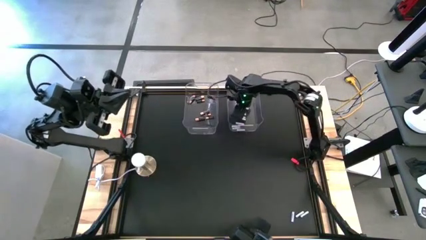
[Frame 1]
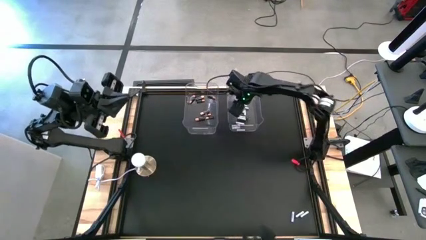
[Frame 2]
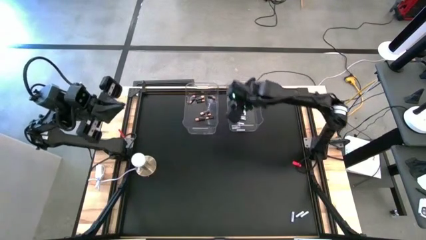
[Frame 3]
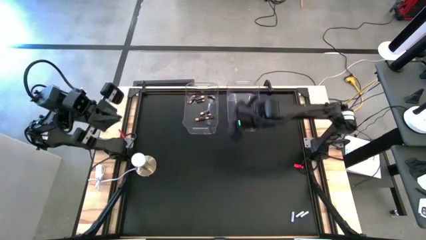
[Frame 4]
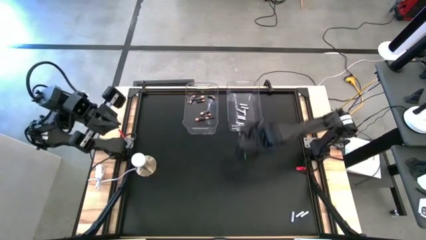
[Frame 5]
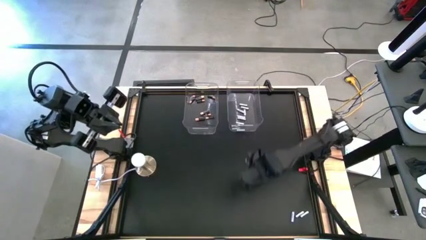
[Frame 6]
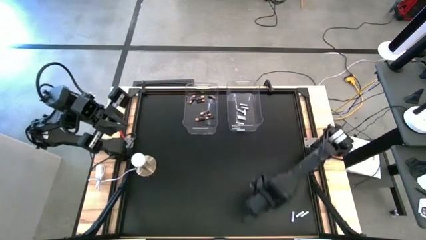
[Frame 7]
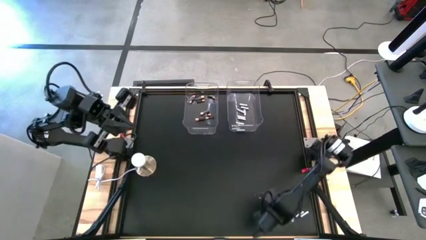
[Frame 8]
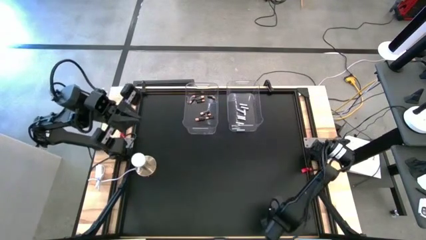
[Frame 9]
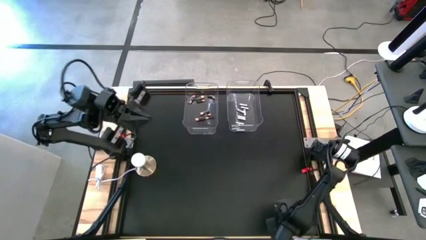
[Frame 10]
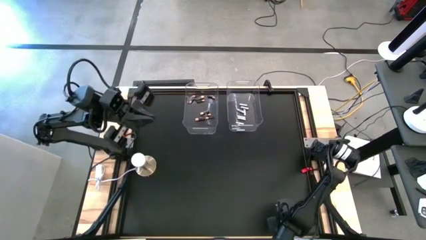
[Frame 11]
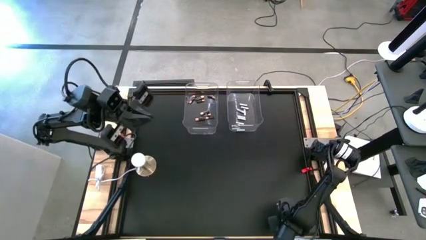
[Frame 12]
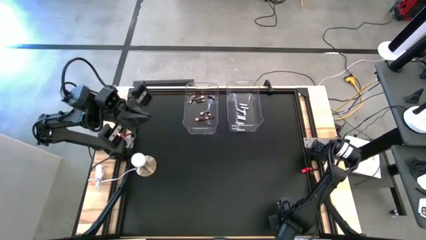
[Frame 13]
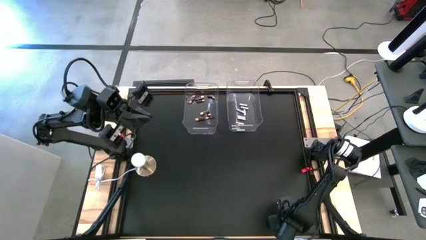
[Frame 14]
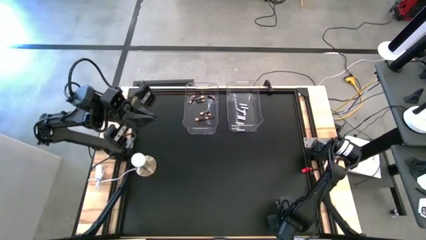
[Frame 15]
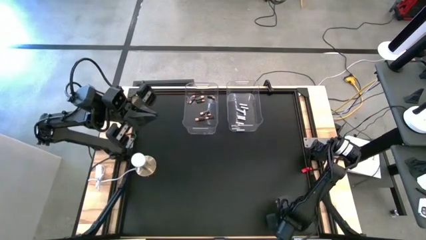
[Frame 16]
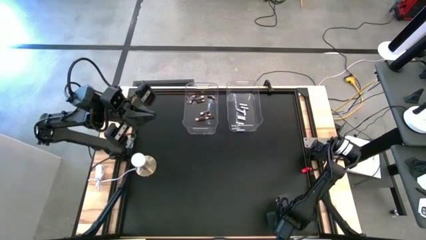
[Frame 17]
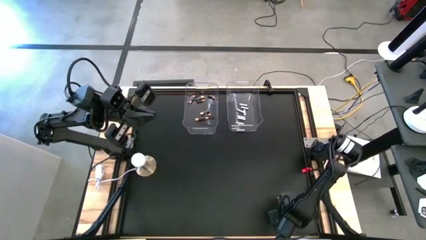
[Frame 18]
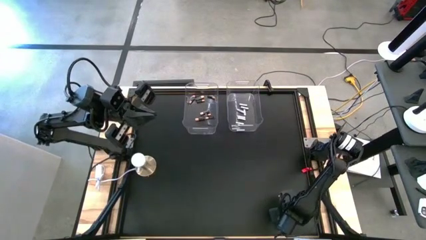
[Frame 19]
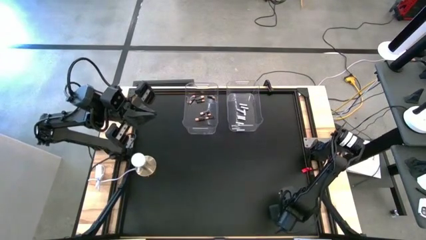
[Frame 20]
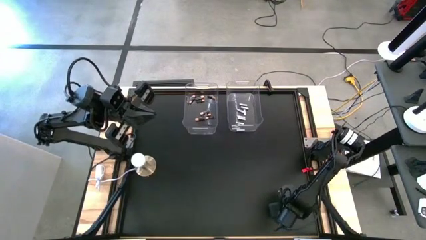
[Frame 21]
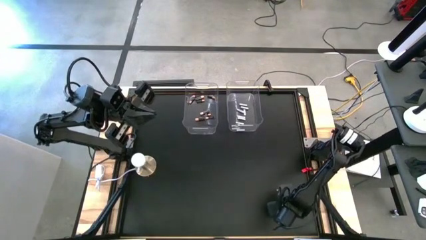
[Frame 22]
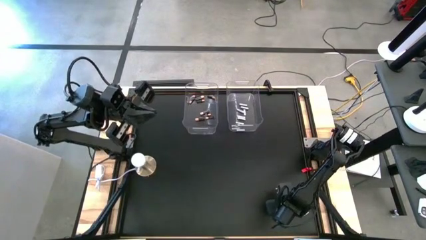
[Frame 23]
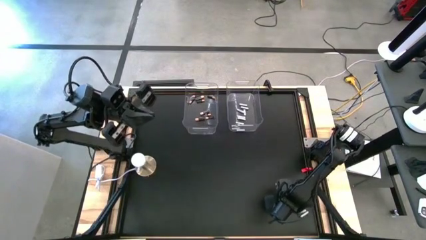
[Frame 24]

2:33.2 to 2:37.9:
Task: Sort batteries
Put the white battery into the right transparent bin

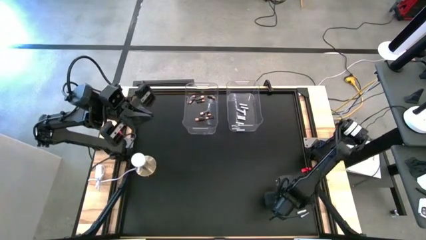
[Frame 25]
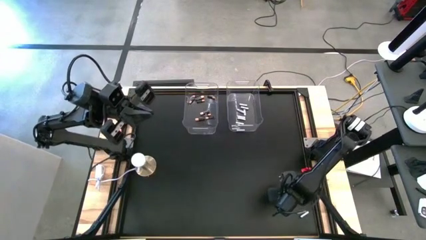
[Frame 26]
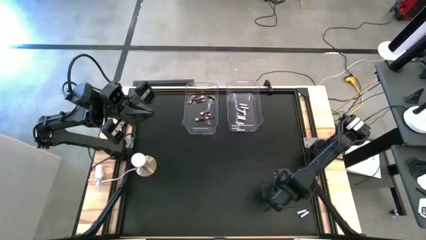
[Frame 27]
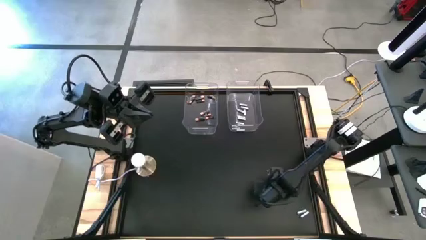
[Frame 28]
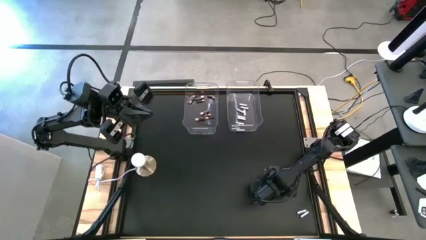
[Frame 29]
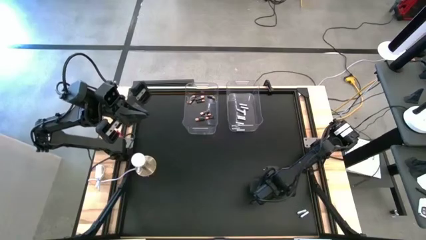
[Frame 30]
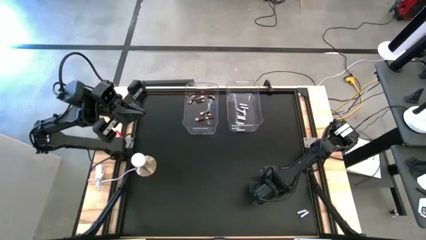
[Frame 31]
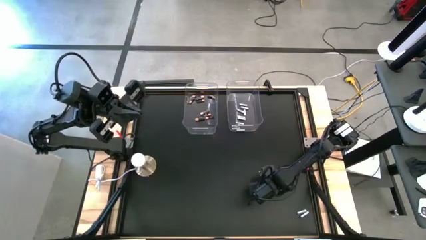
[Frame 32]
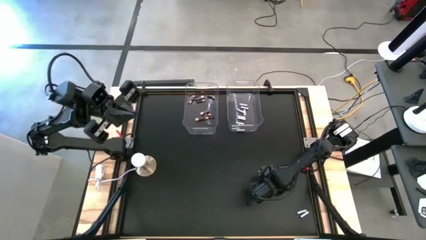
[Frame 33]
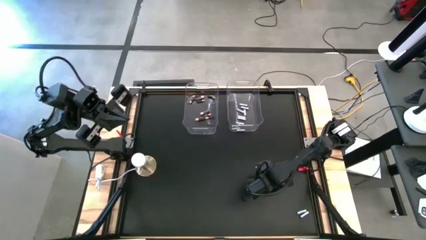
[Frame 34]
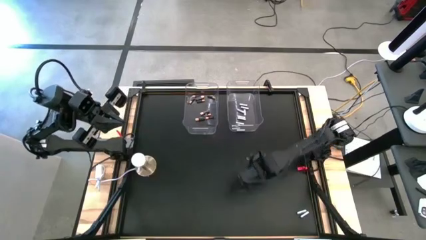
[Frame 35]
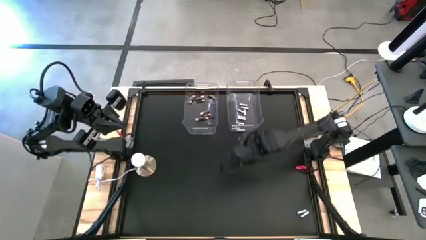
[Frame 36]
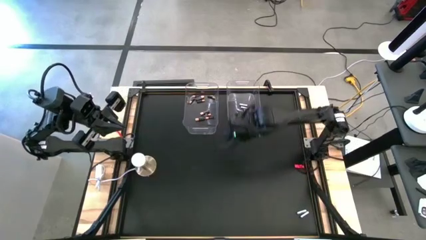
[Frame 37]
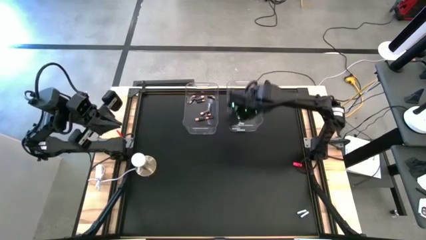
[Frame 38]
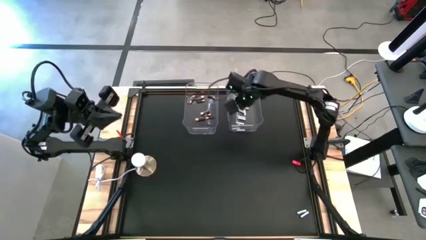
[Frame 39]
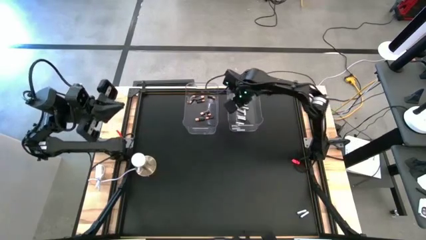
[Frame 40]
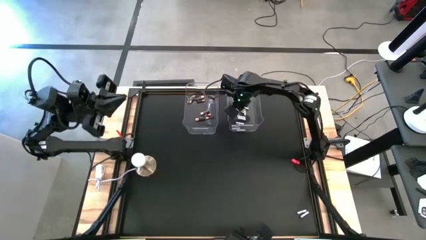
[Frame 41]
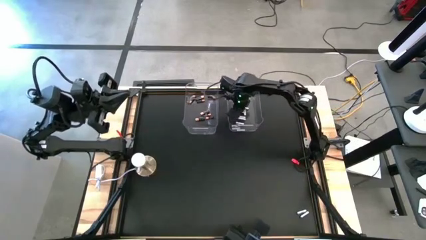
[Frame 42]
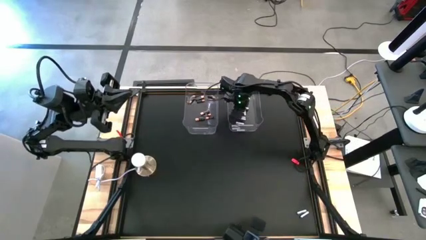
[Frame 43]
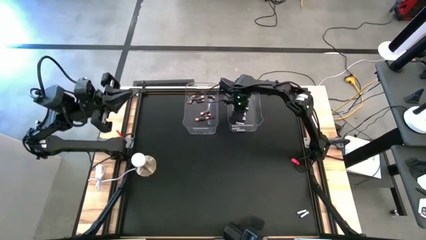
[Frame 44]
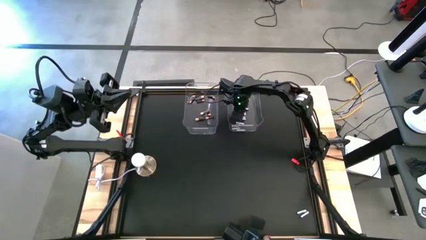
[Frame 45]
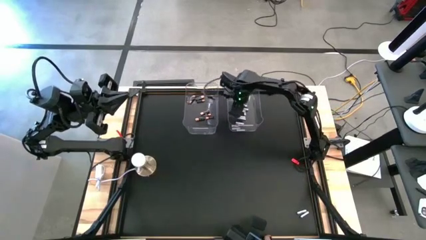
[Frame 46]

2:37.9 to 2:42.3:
Put the white battery into the right transparent bin

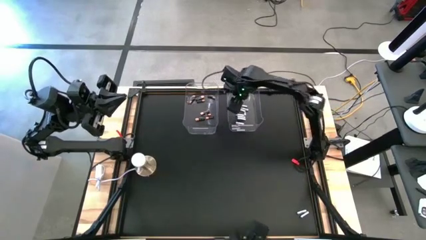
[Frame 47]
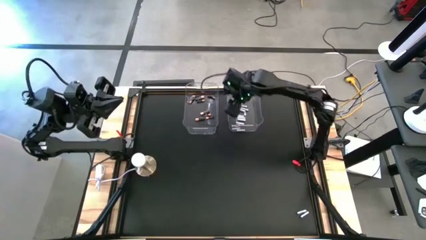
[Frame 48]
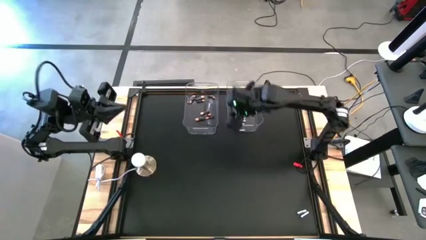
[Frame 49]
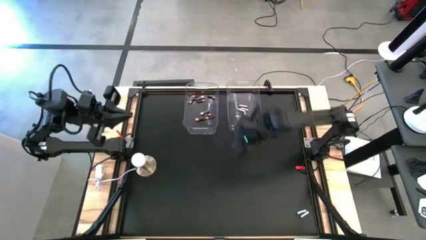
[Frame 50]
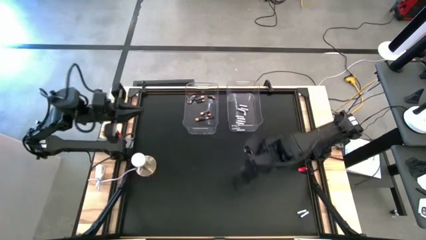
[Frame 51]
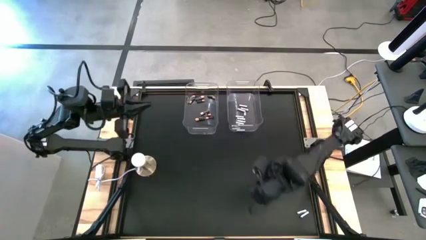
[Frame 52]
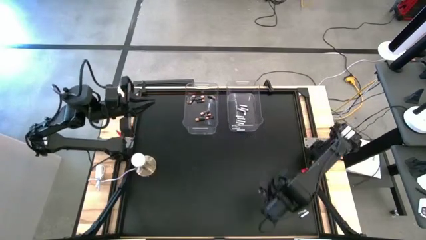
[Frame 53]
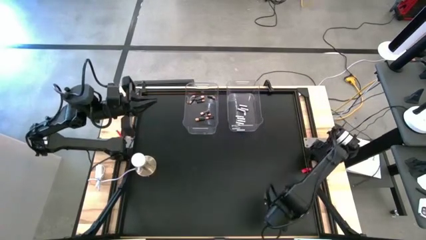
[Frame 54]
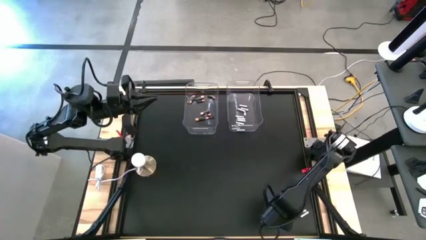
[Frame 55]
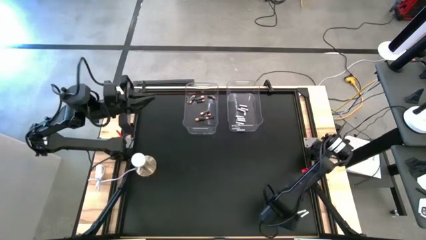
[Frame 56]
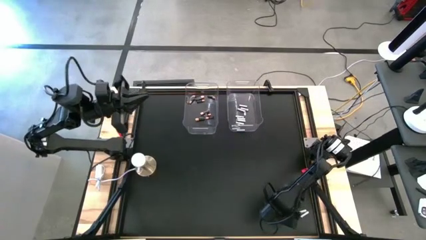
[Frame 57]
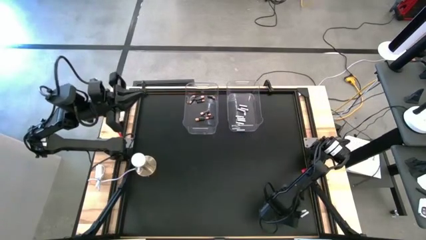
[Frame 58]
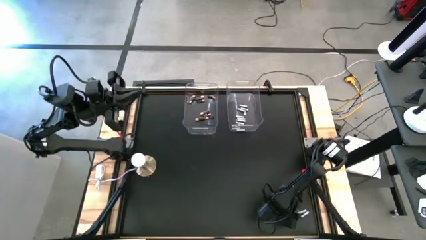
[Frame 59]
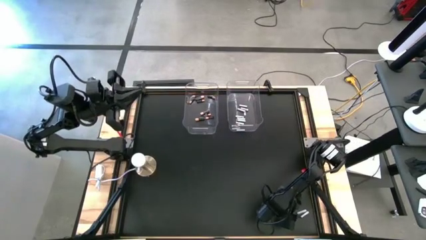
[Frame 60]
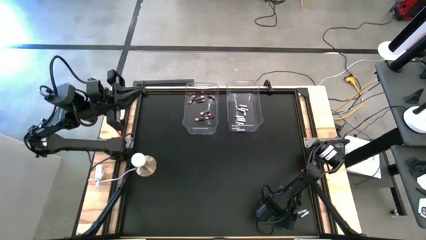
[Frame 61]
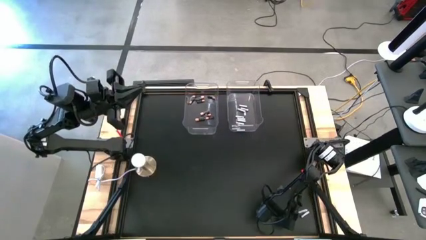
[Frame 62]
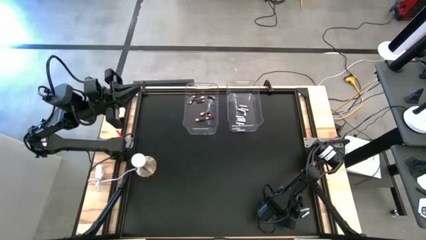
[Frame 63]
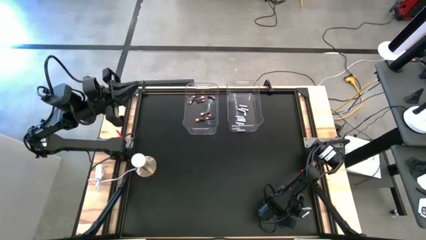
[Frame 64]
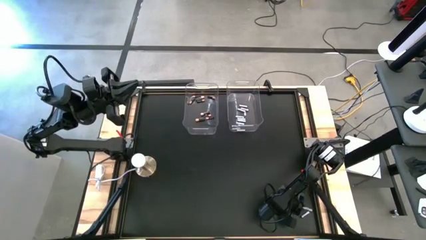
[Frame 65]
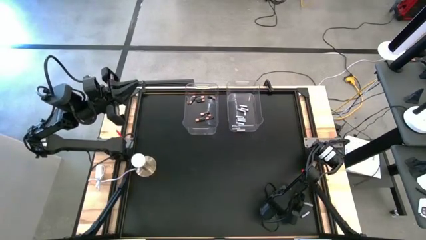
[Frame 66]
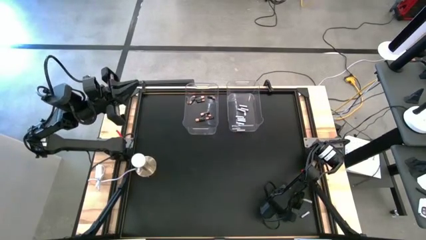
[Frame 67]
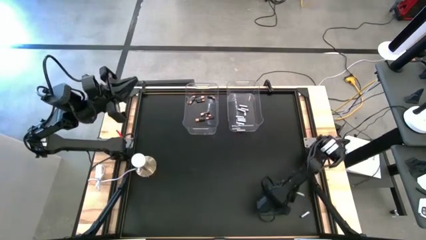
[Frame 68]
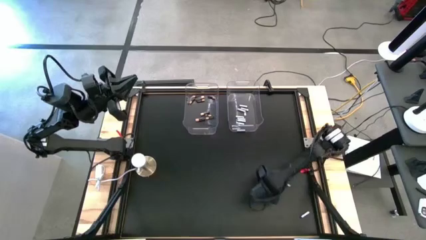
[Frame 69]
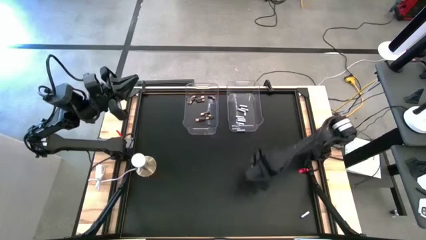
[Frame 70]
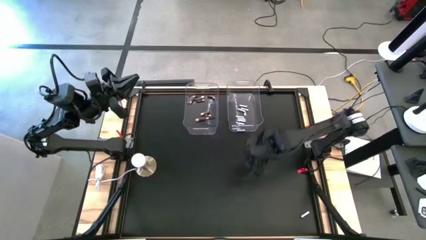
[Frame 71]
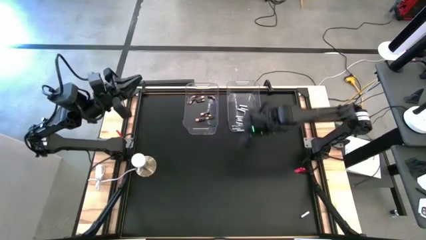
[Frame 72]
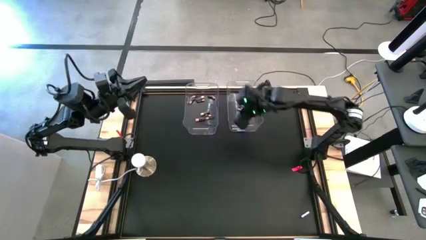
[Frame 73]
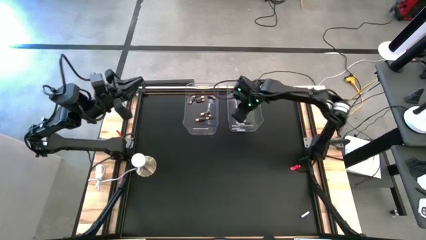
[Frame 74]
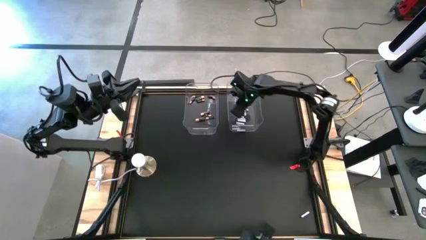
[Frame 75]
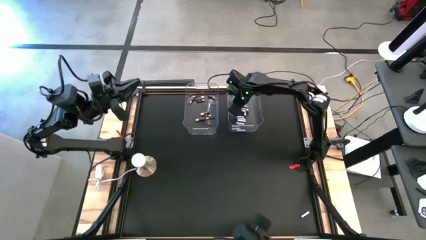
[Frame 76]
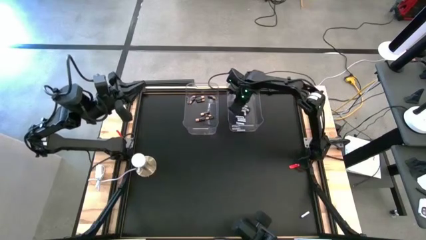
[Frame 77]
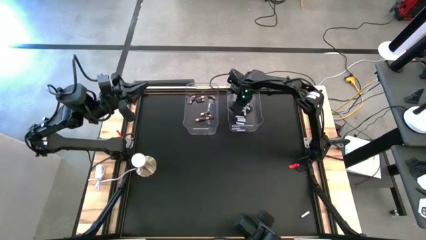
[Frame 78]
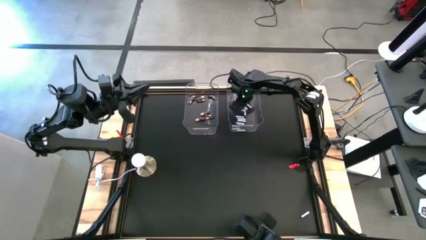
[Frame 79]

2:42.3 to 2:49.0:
Put the white battery into the right transparent bin

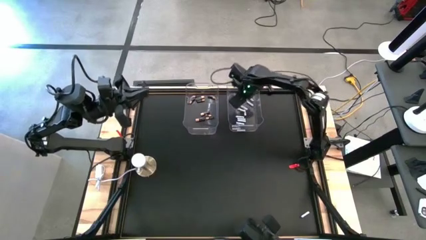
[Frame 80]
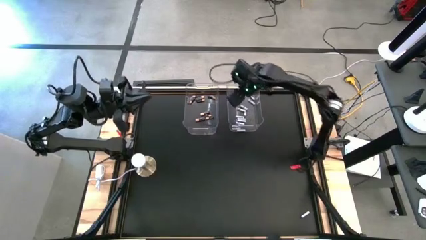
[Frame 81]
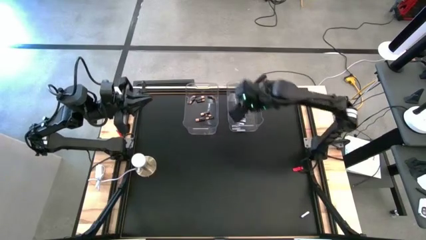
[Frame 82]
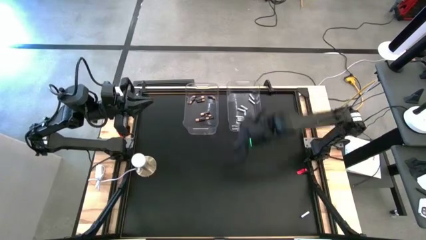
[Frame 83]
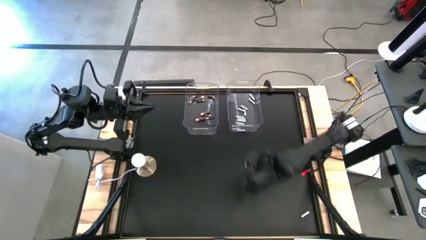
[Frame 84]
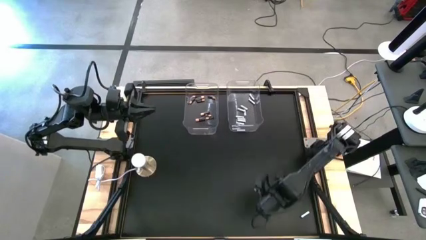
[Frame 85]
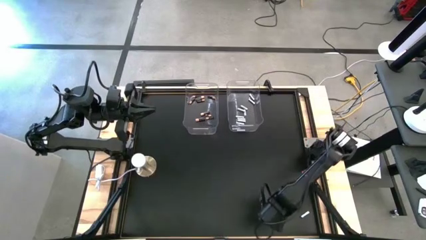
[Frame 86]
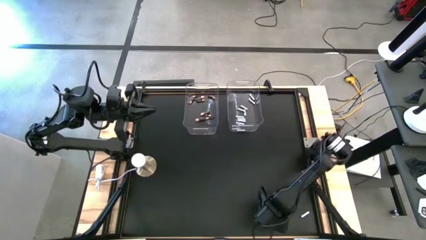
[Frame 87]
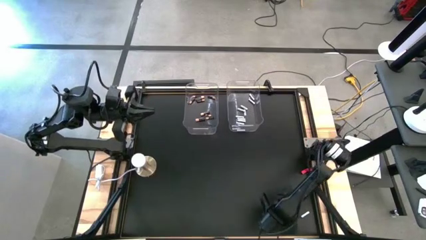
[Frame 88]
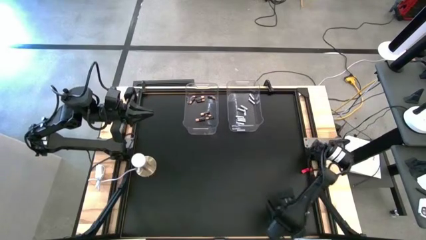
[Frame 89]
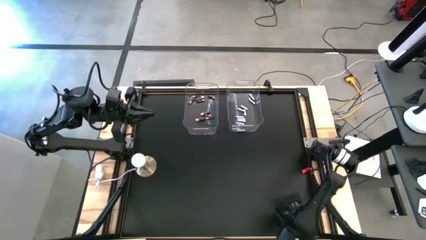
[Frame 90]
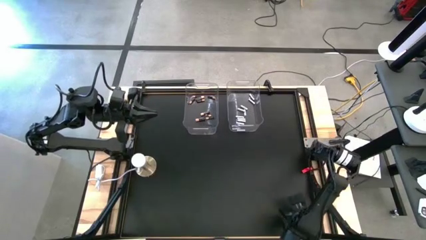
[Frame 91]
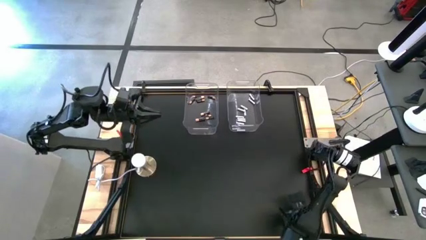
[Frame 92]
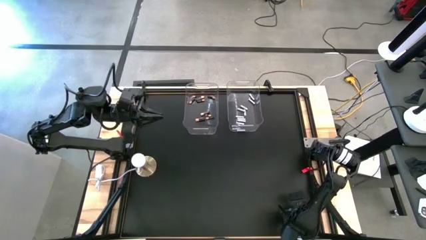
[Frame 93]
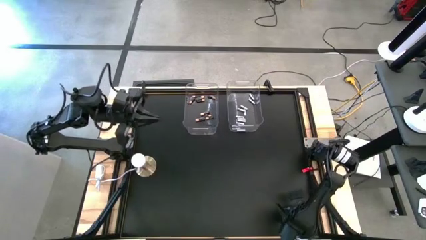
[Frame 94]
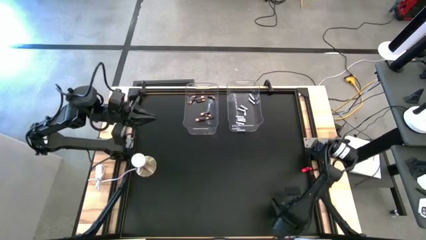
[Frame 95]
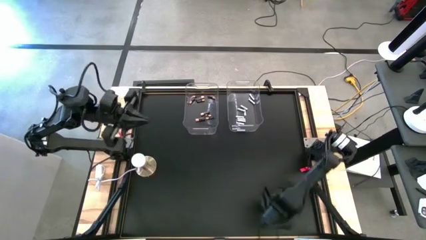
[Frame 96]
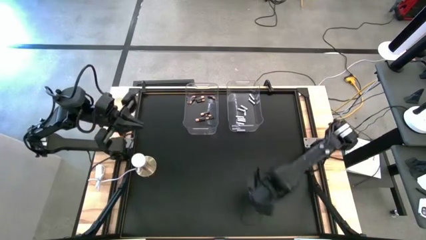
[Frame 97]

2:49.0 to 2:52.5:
Put the white battery into the right transparent bin
